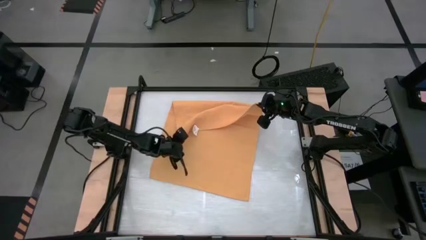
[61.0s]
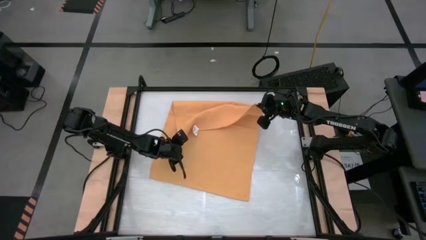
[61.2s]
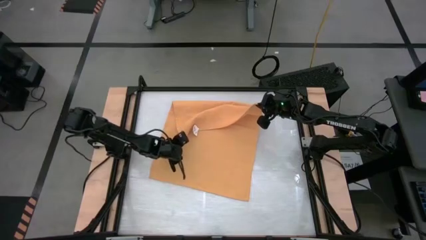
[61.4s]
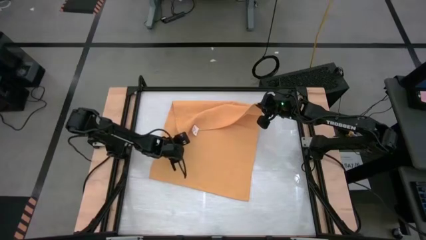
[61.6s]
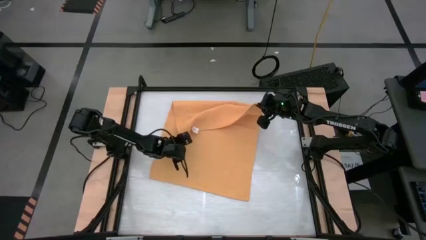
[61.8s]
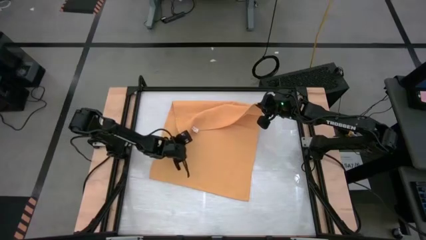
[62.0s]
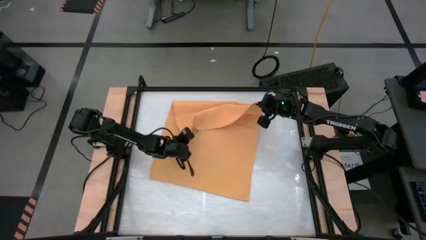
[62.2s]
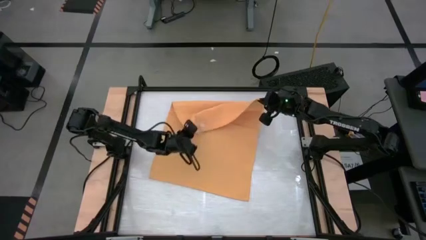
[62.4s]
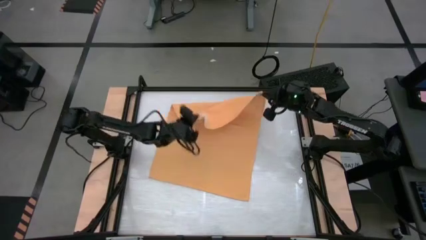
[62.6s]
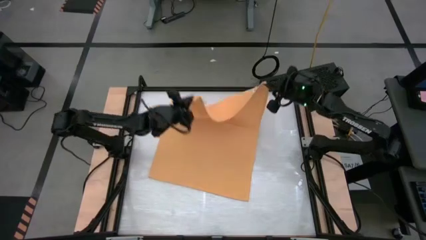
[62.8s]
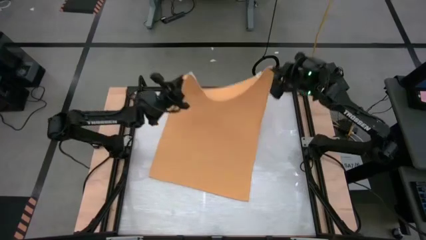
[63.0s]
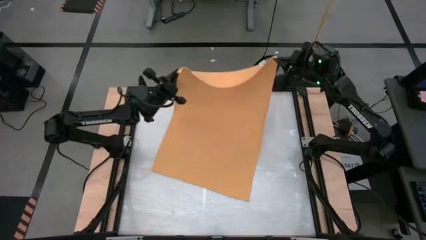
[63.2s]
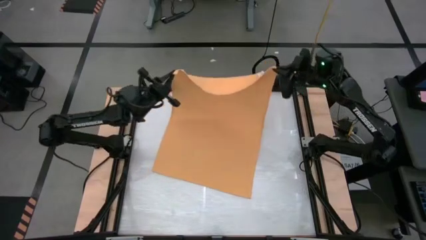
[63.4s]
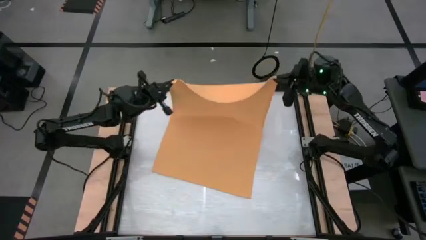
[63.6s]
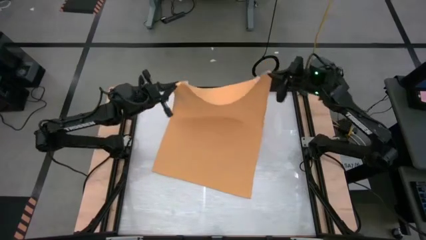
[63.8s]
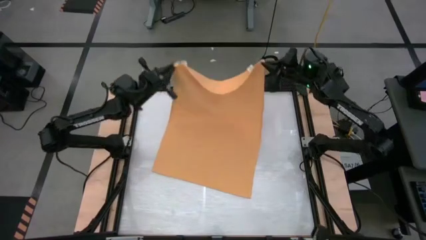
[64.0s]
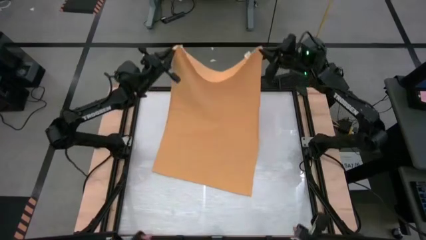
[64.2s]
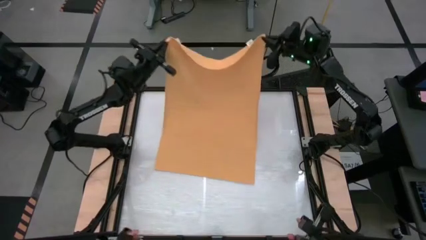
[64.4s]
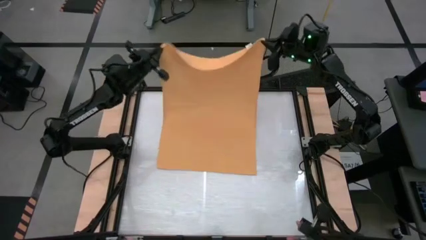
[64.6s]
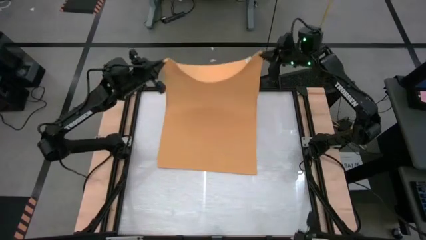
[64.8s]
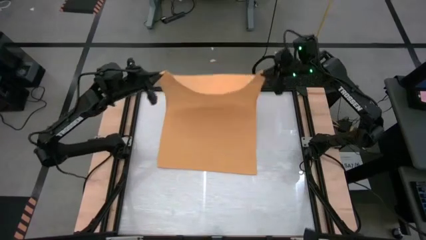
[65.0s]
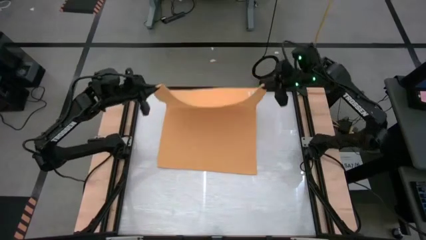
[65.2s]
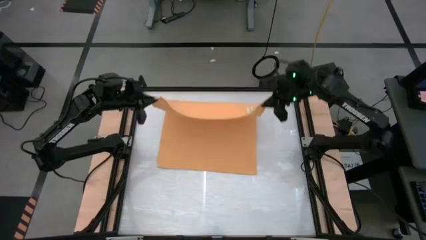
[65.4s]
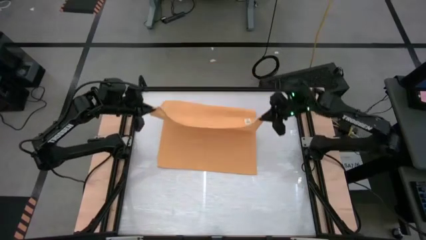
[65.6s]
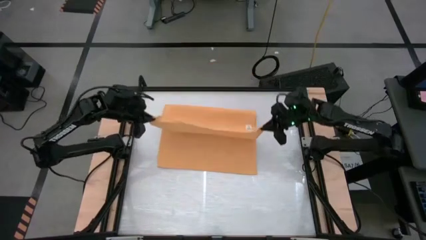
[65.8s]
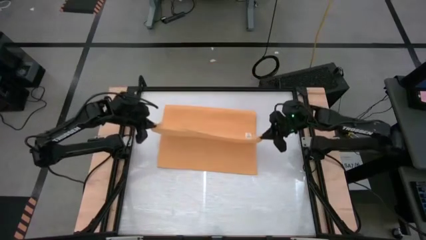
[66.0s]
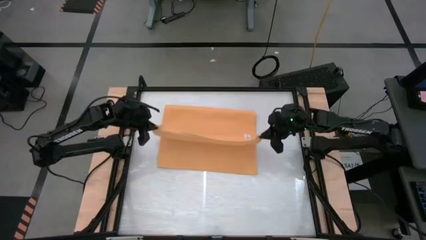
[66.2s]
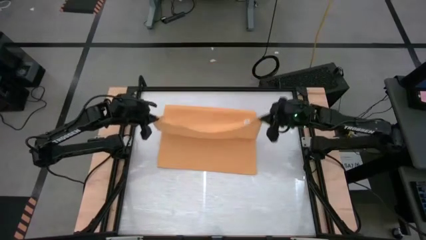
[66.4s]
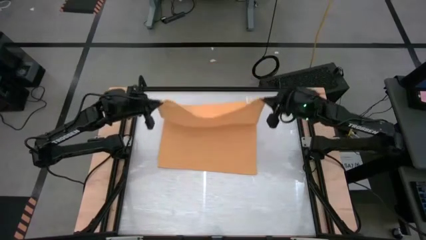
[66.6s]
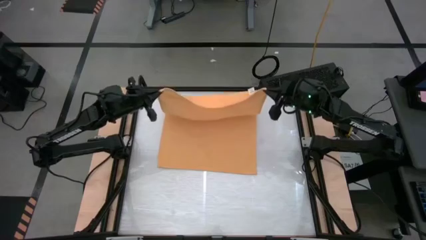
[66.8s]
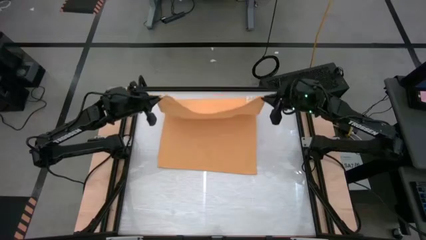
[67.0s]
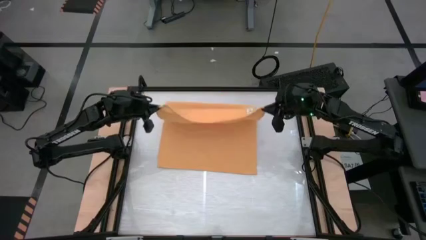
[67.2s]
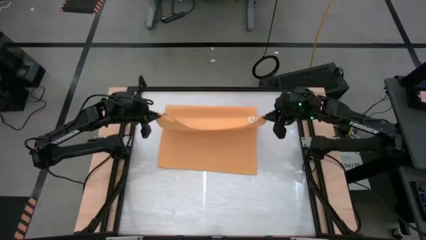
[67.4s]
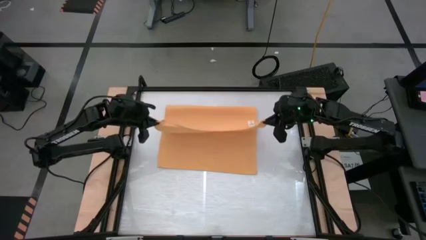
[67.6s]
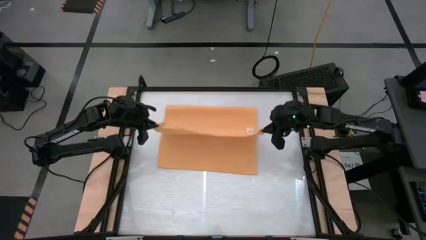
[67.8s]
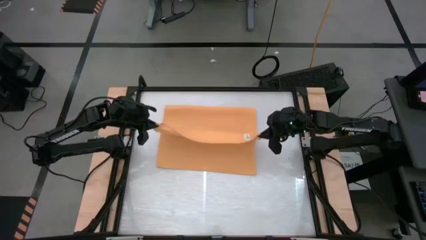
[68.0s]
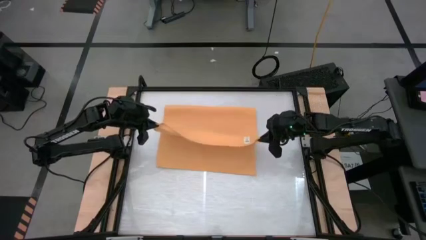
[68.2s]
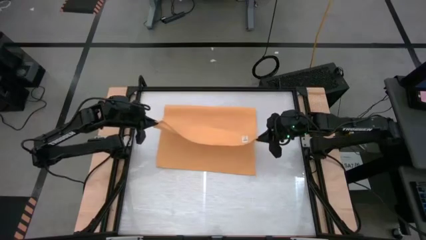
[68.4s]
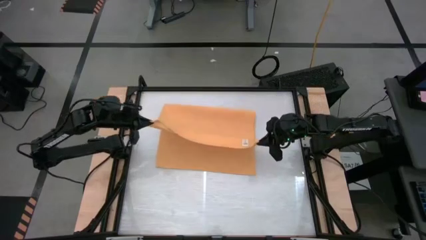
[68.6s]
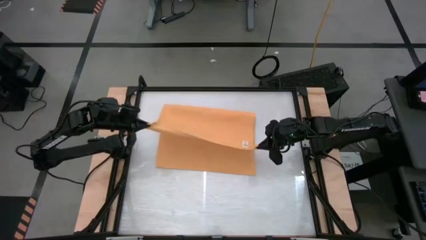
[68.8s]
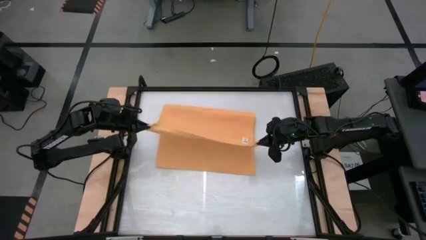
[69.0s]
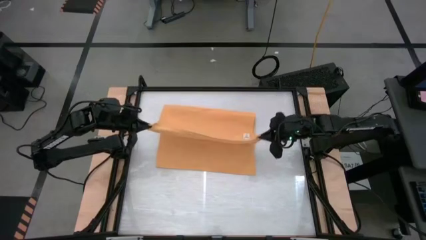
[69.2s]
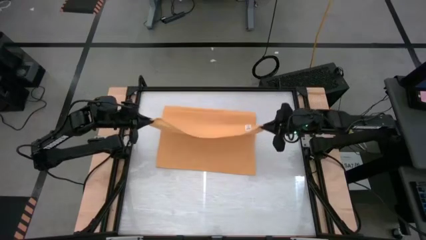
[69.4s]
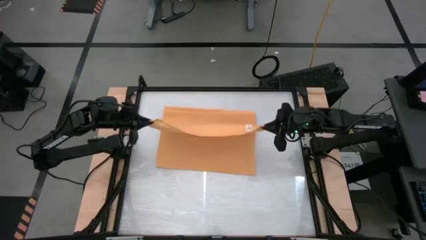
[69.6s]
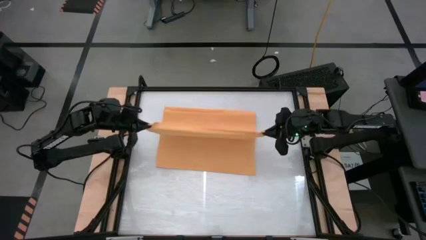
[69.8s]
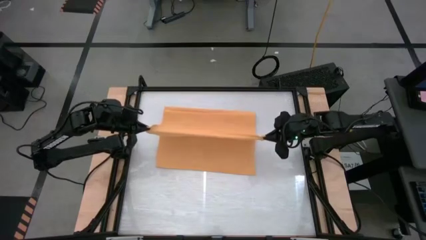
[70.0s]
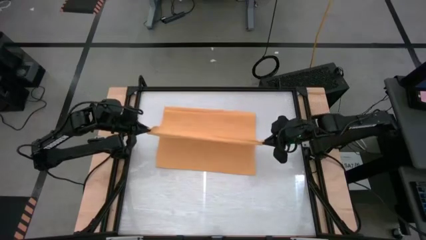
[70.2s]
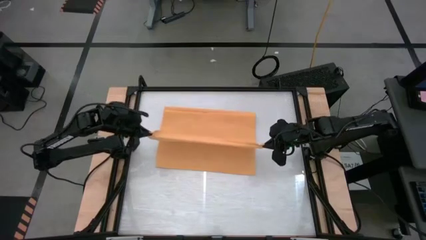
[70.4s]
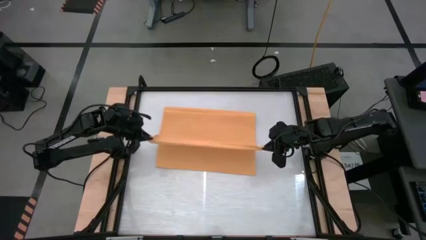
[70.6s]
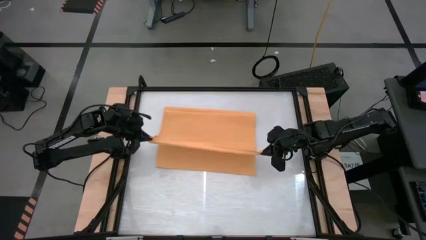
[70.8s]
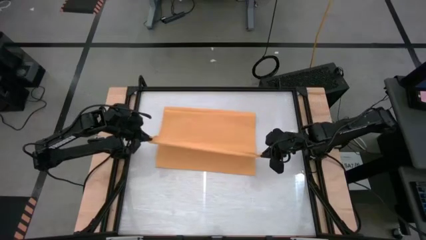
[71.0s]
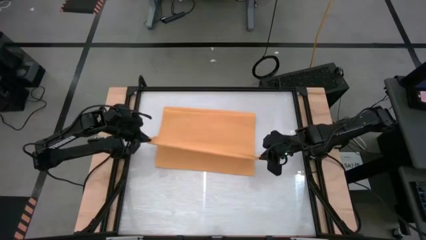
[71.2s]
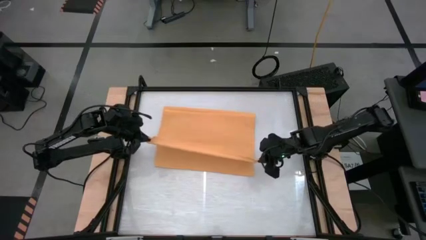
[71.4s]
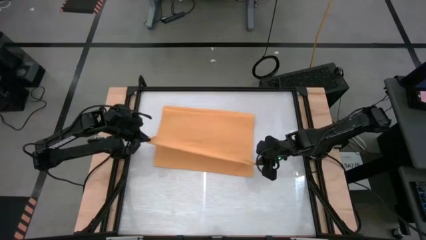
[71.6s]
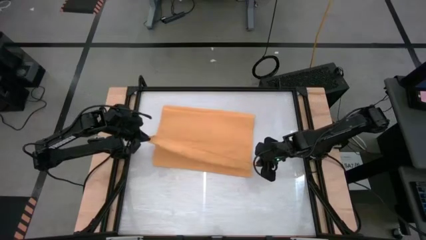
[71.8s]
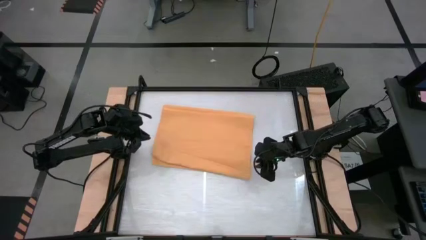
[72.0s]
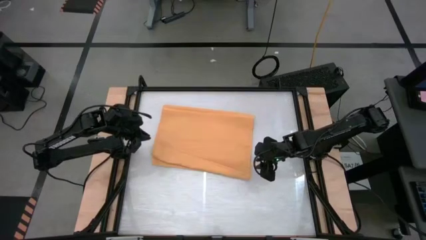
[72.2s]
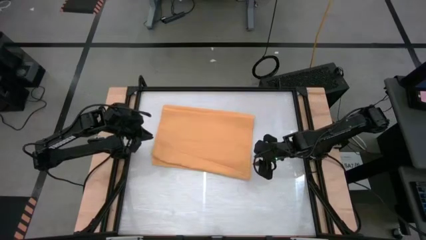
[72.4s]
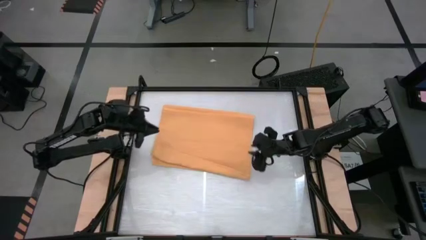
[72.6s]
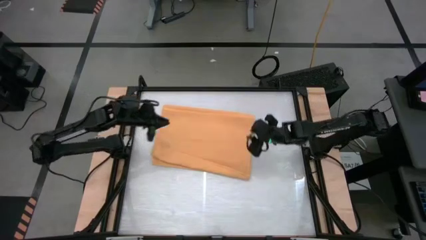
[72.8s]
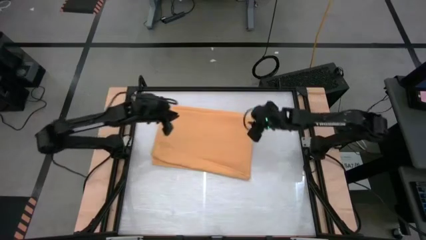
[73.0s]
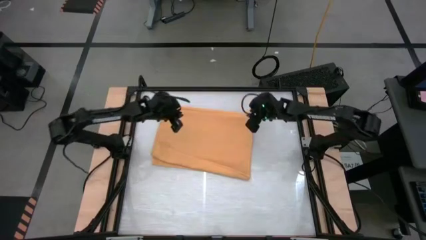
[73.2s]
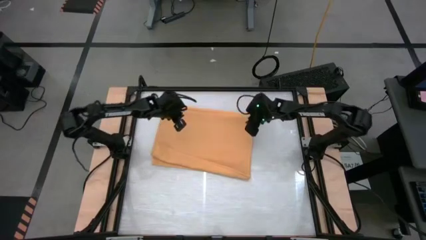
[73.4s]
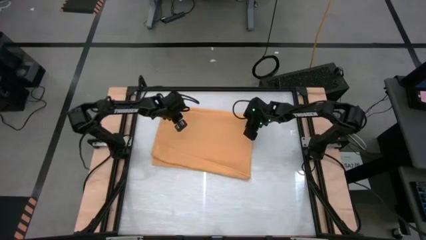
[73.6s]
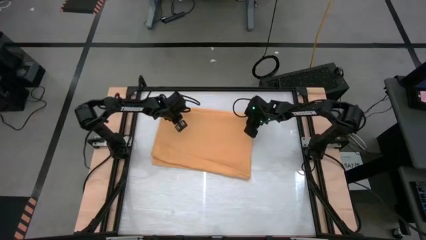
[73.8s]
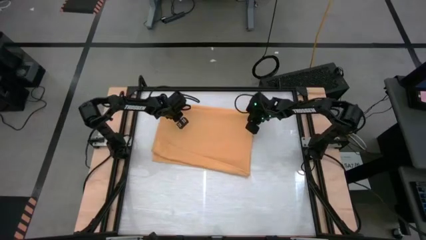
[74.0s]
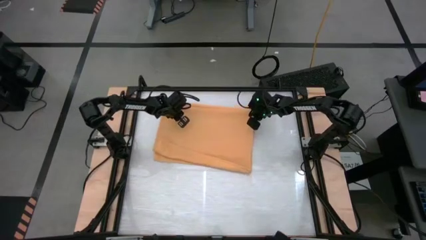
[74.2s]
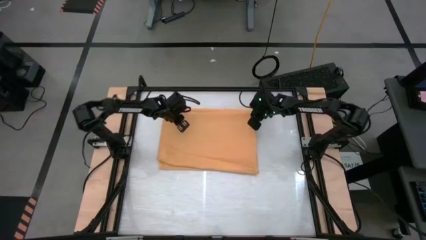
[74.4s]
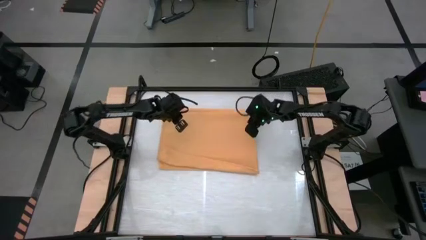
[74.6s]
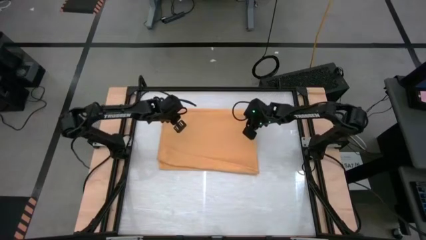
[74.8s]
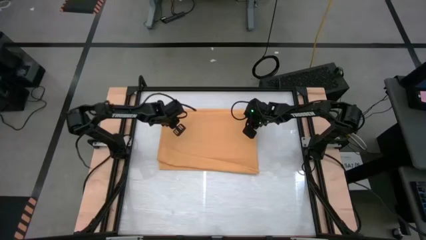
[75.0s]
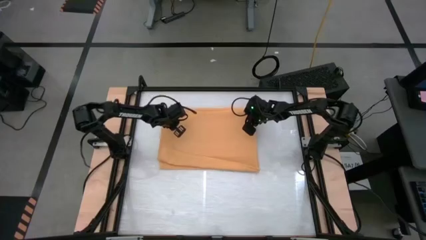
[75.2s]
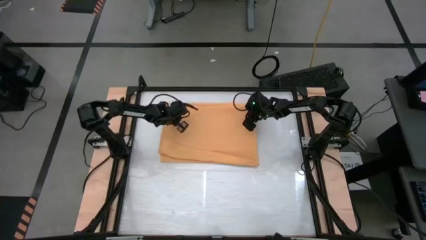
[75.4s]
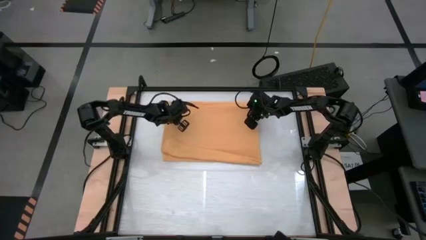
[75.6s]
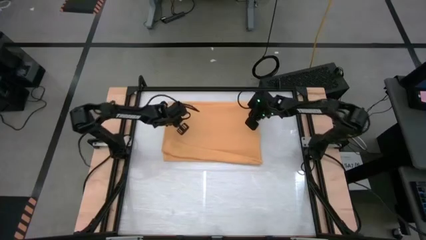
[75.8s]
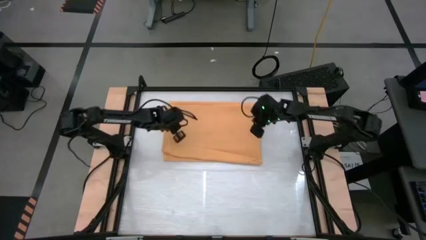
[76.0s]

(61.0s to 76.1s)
Task: Roll towel
Roll the yellow towel
